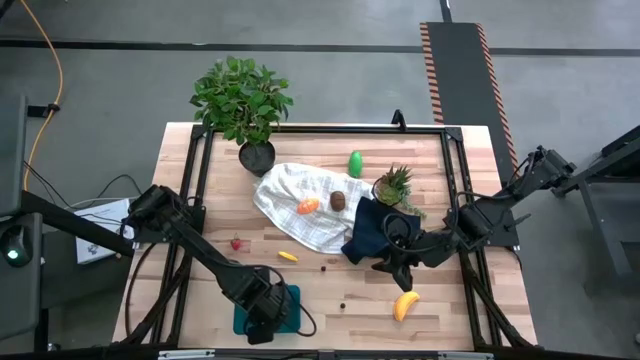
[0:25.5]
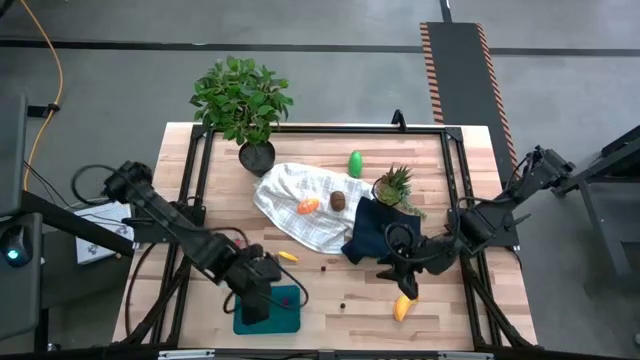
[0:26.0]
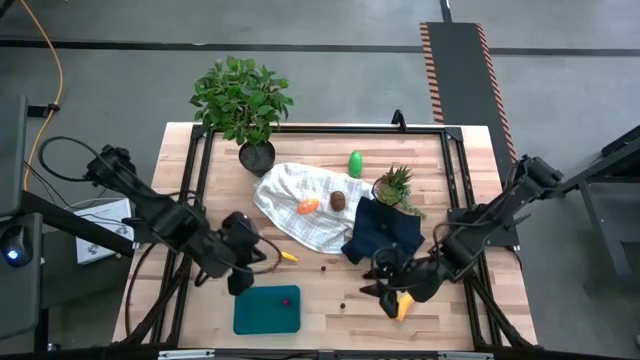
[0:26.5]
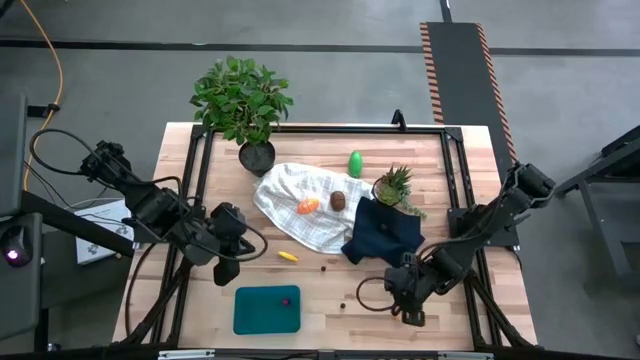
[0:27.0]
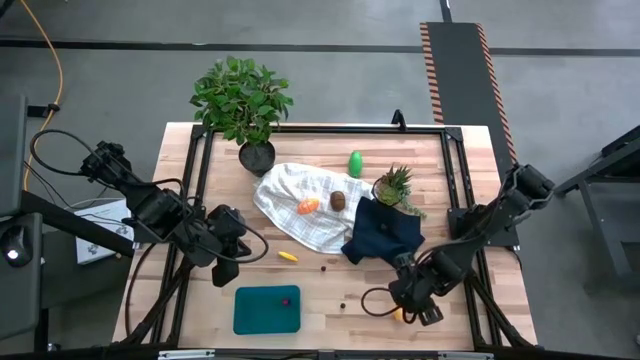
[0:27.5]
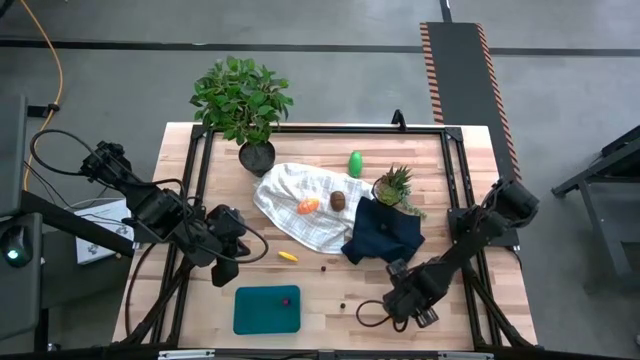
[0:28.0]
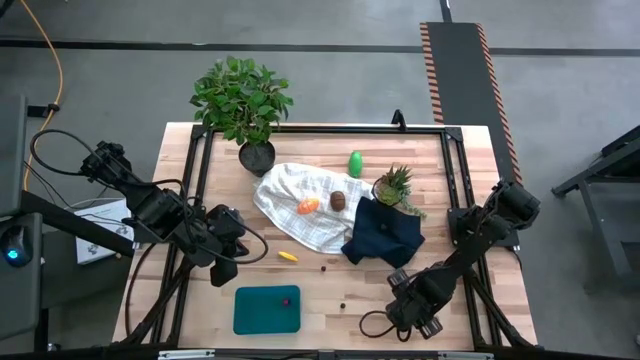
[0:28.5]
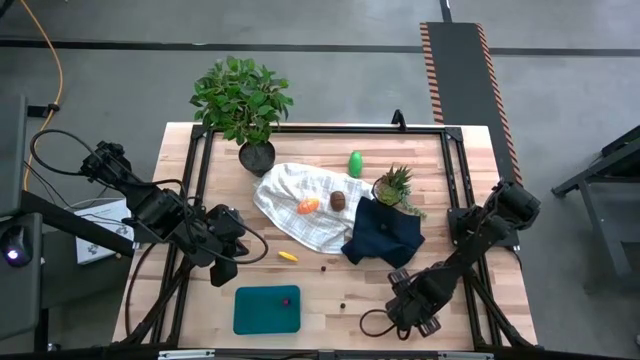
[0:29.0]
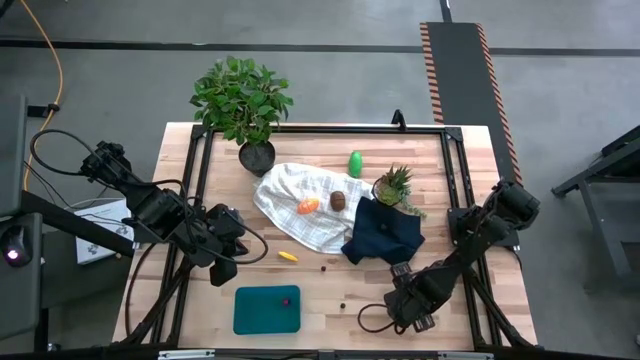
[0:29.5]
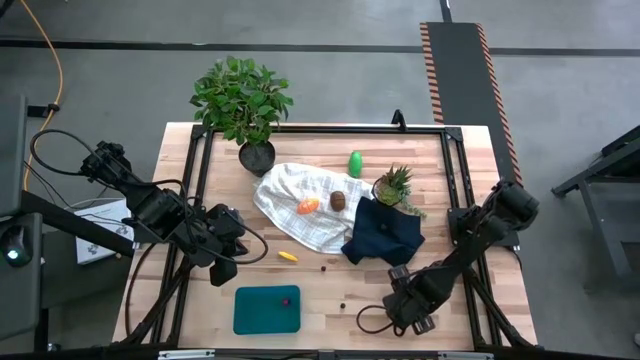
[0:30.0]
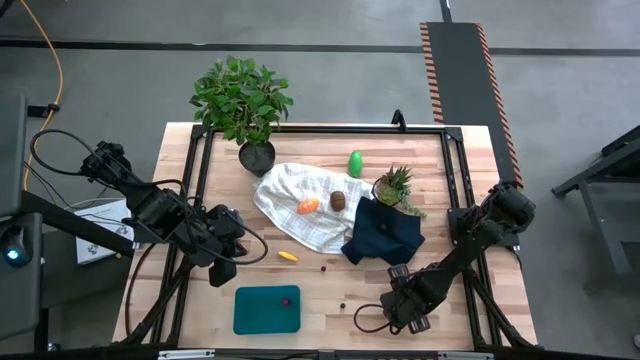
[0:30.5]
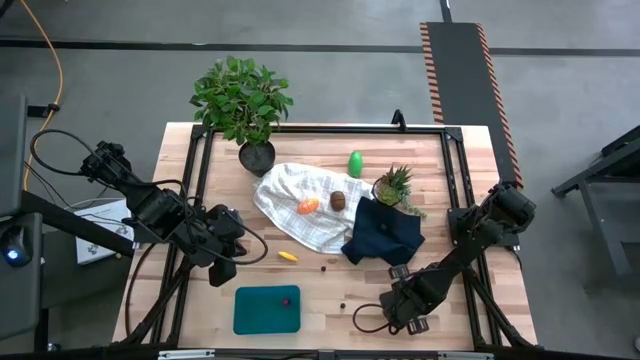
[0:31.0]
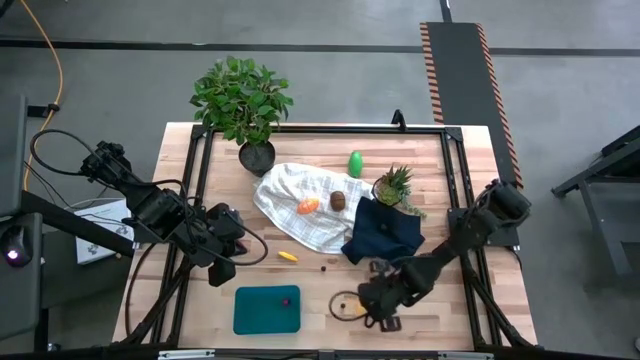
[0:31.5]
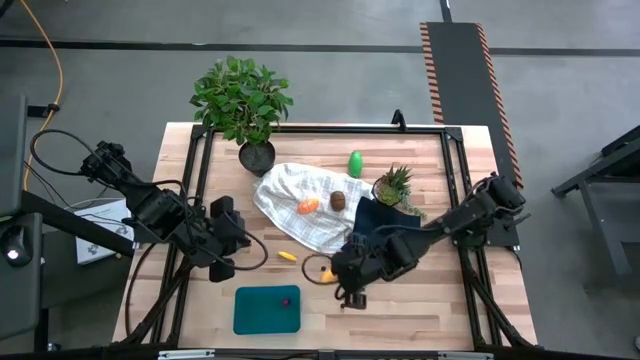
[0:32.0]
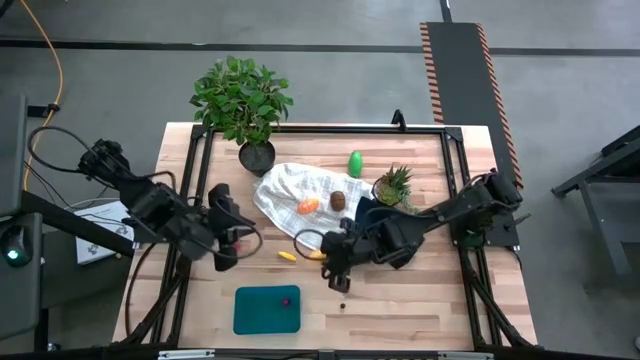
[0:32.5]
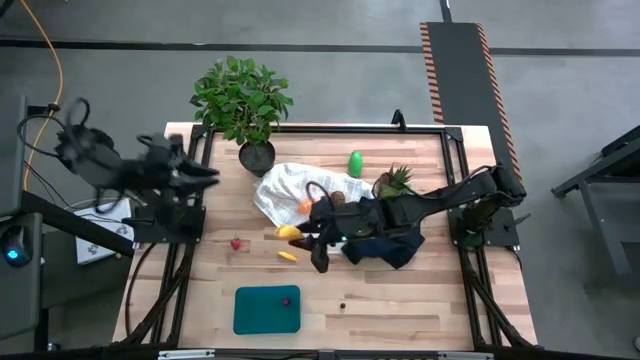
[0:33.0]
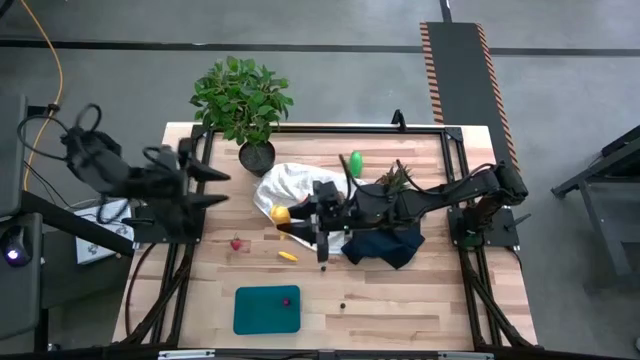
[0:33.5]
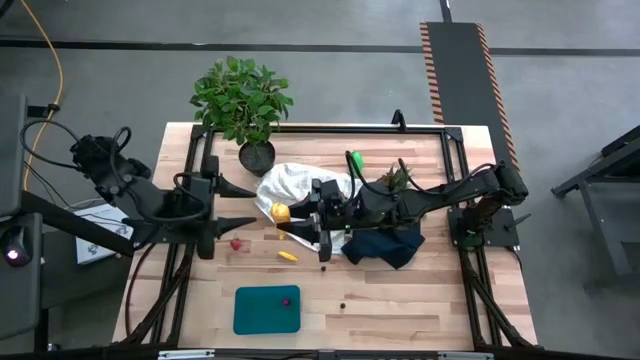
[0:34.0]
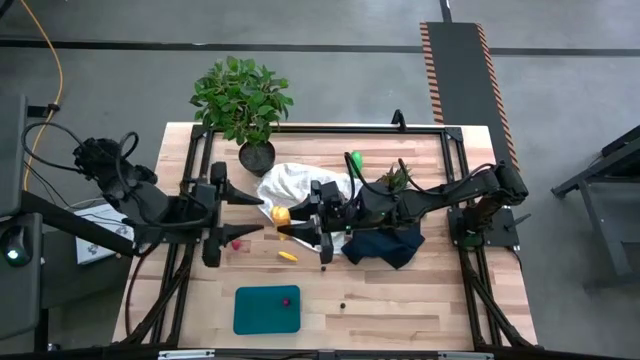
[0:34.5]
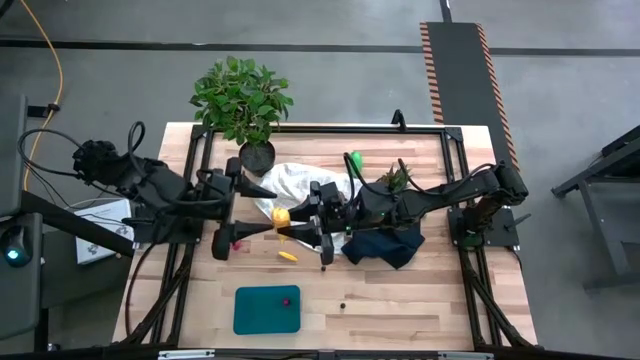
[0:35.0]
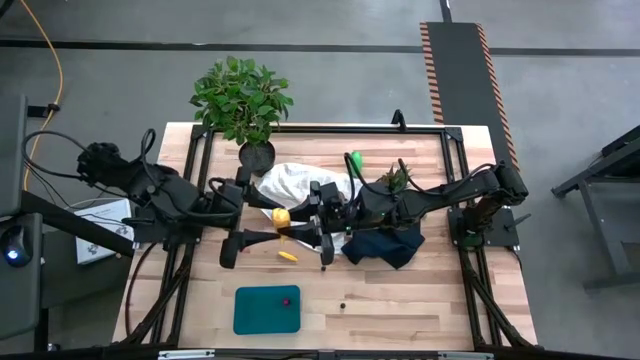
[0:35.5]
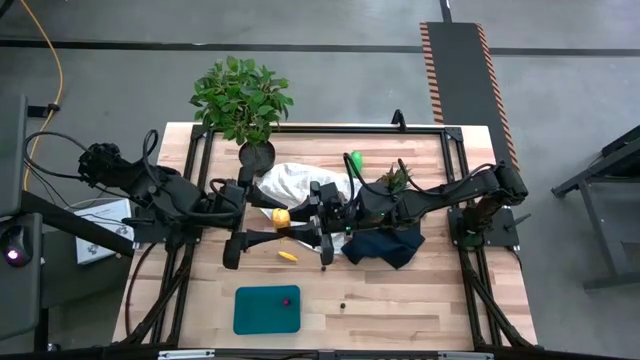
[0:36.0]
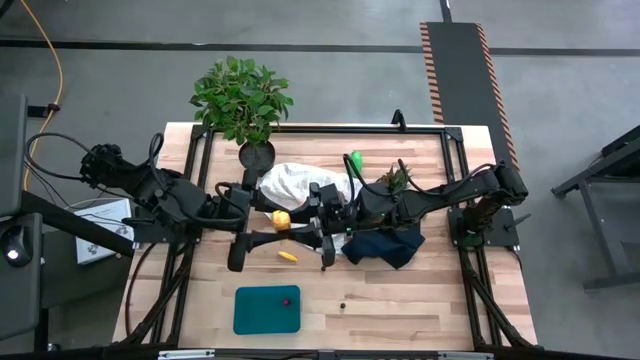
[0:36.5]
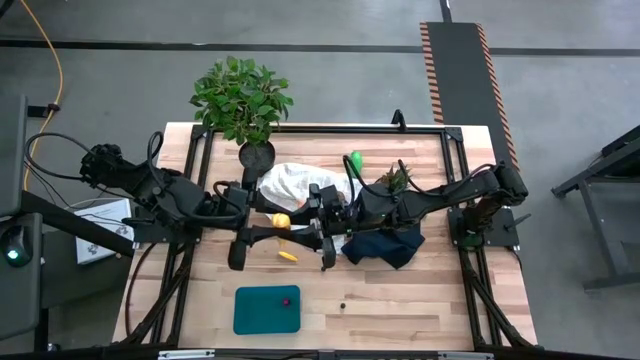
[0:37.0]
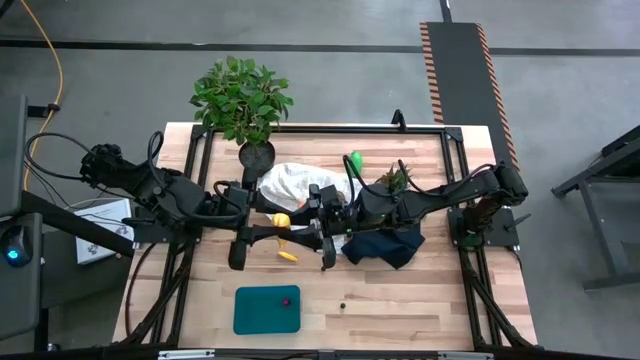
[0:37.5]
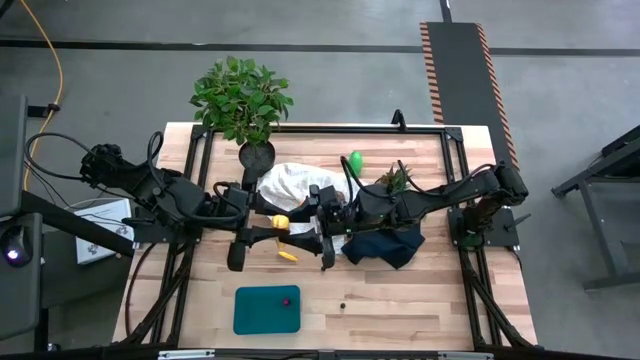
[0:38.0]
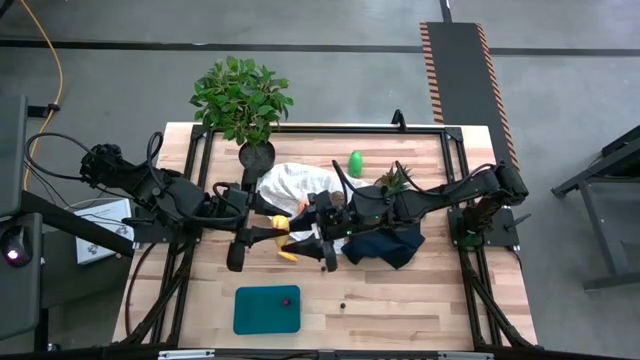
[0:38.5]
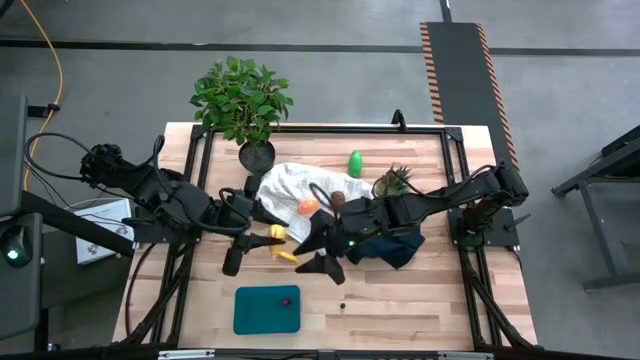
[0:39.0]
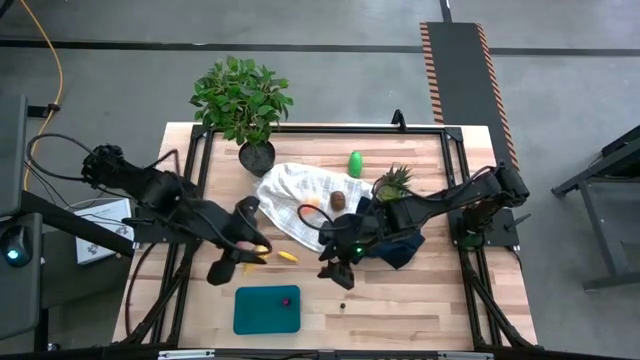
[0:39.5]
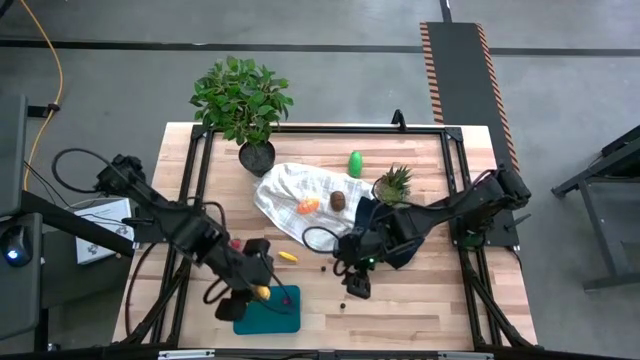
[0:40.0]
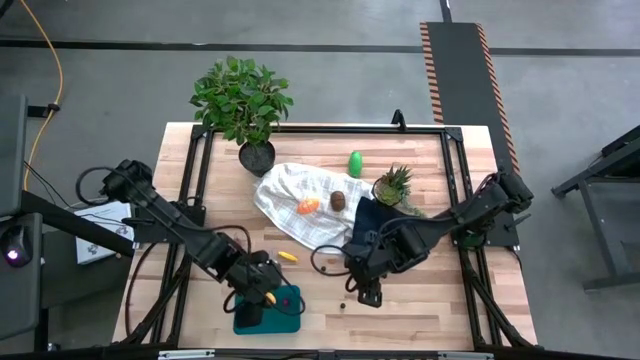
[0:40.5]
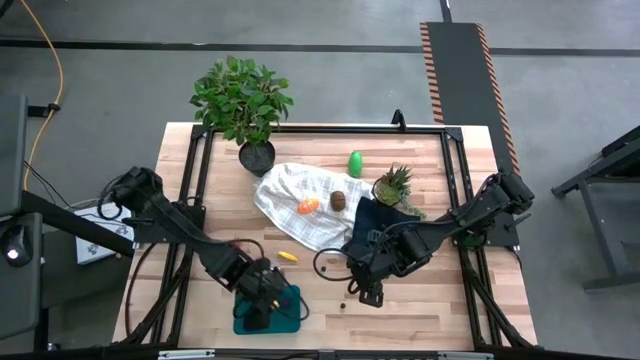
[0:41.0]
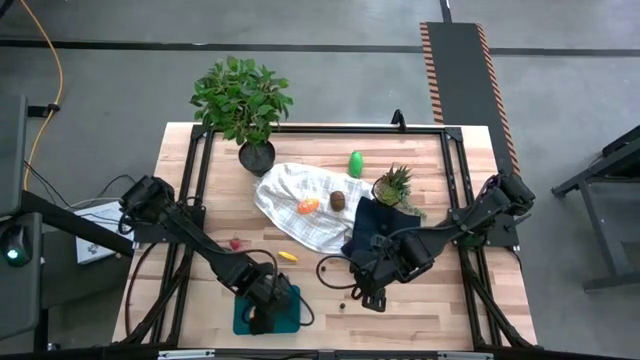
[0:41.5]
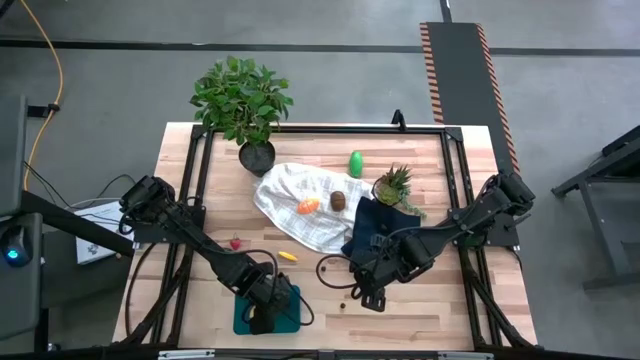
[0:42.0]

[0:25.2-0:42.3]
Task: Pick and placing Produce into tupperware
Put the banana into the bin

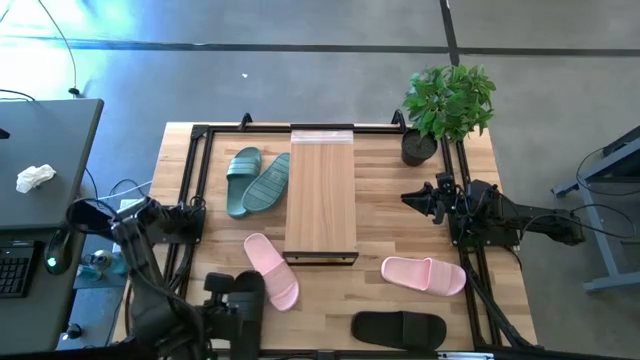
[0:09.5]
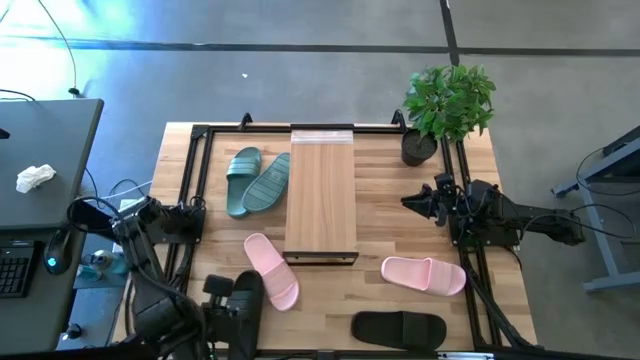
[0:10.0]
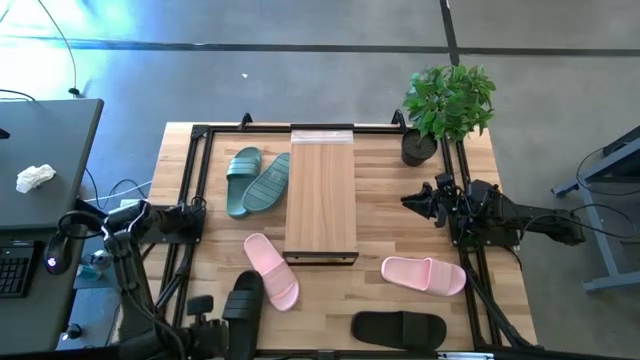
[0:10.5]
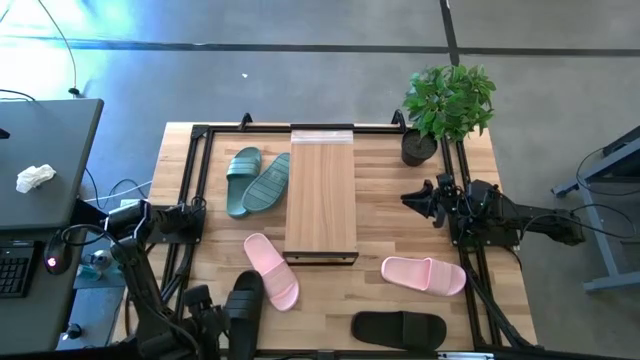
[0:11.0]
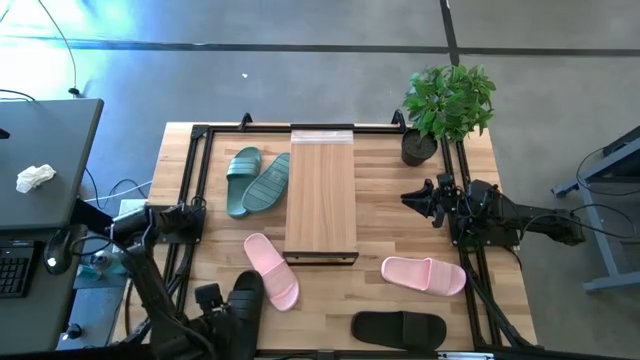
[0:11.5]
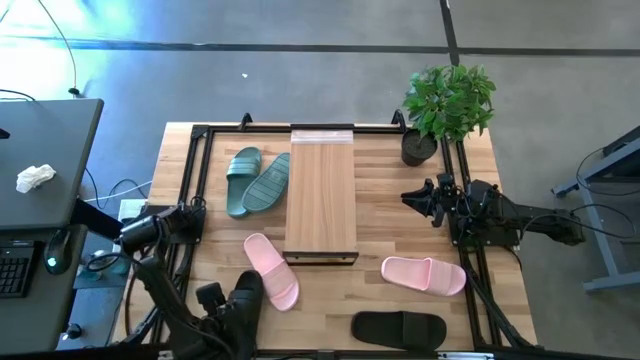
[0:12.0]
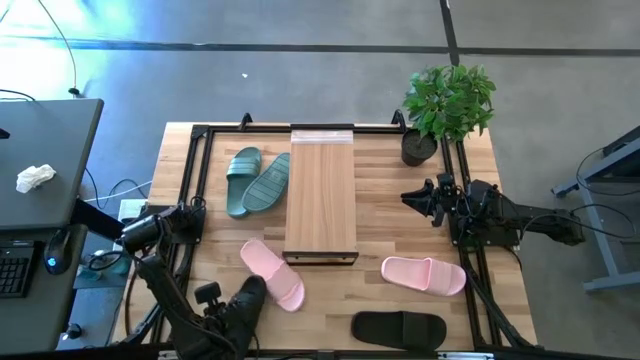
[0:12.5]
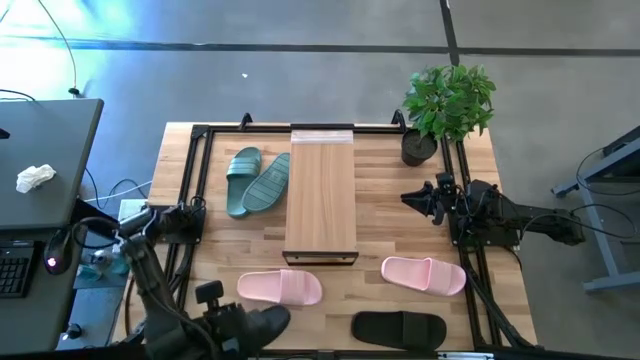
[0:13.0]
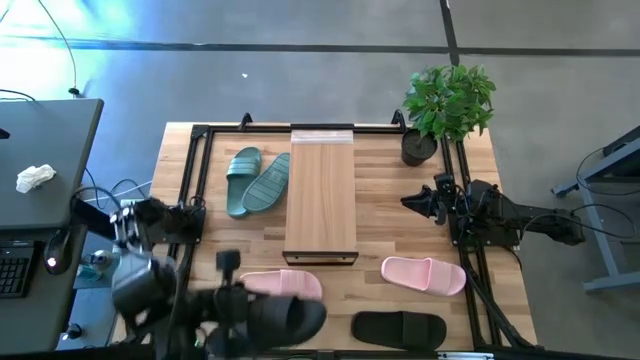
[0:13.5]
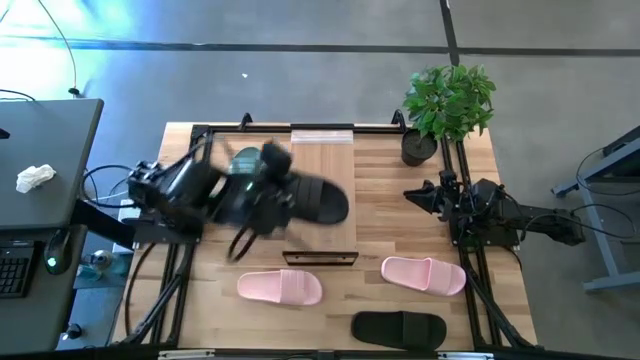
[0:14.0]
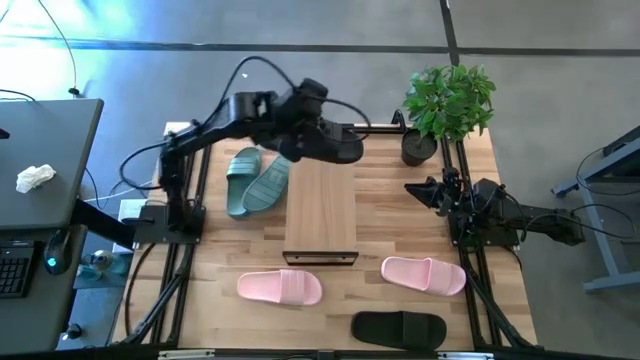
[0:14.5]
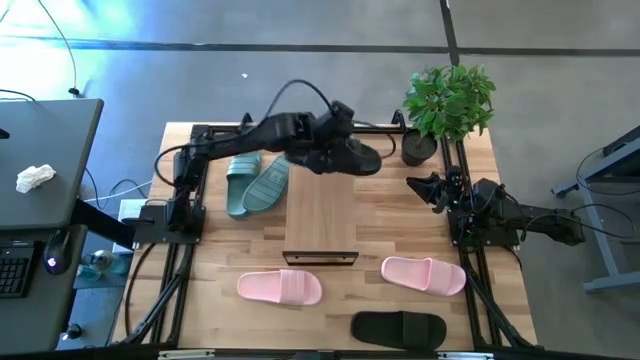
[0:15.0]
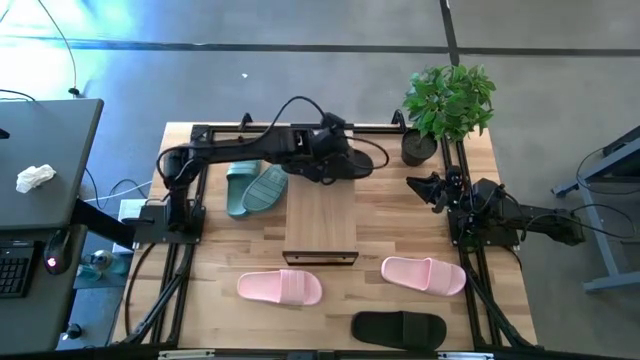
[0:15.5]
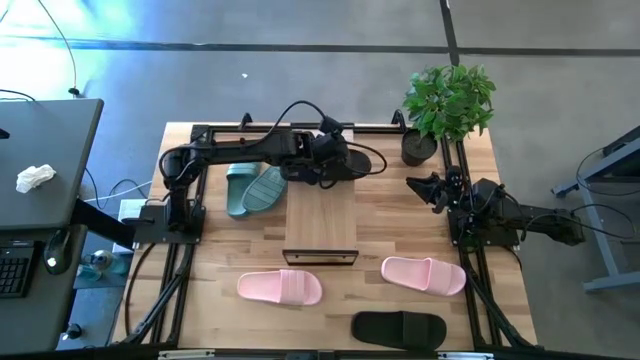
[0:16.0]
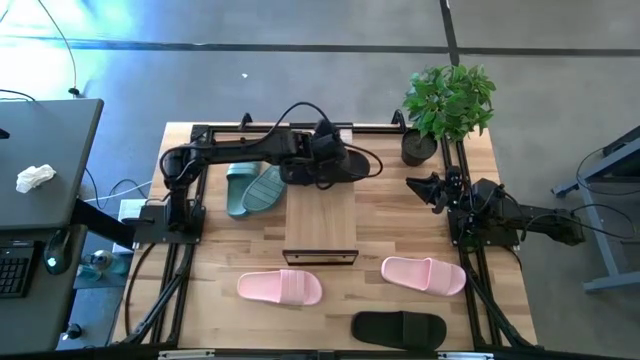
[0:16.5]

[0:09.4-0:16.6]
Task: Pick and place slides into the shelf
Put the left black slide on the shelf
